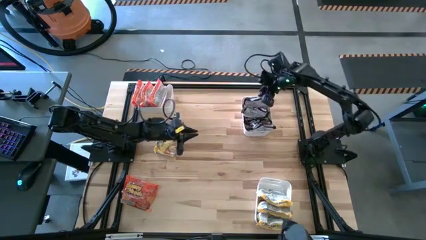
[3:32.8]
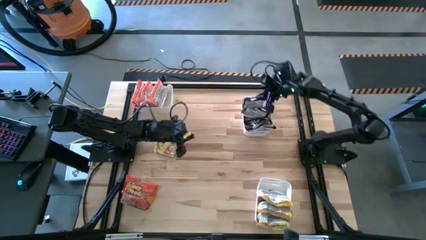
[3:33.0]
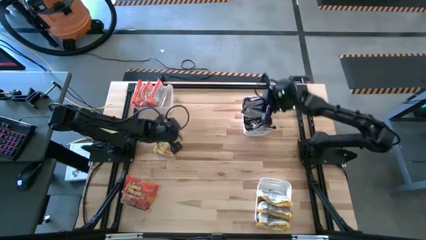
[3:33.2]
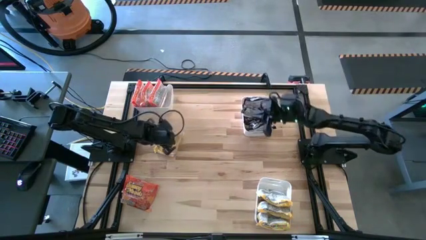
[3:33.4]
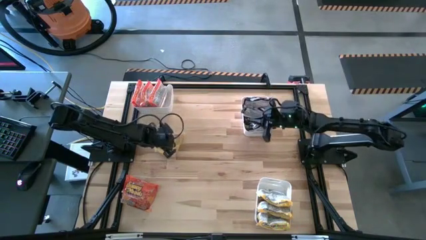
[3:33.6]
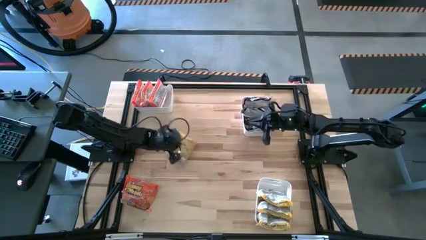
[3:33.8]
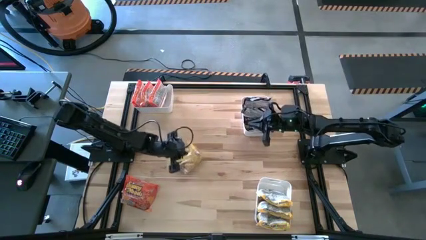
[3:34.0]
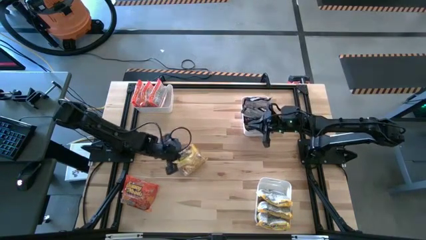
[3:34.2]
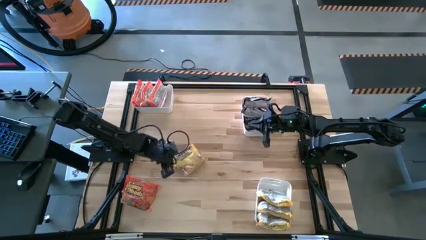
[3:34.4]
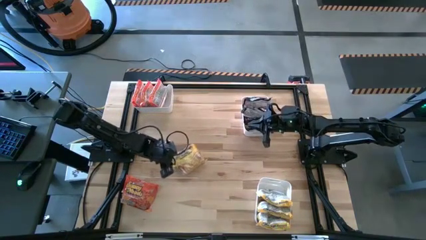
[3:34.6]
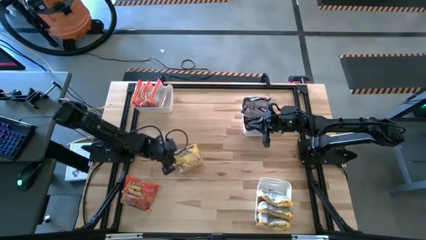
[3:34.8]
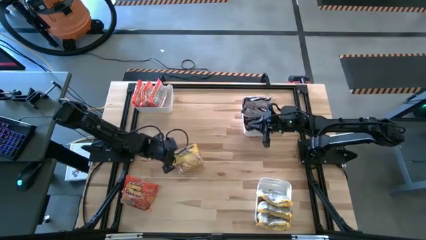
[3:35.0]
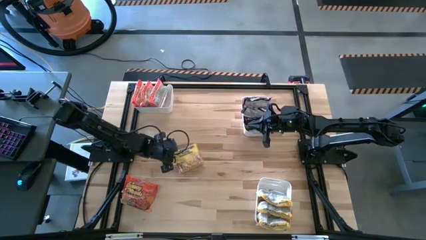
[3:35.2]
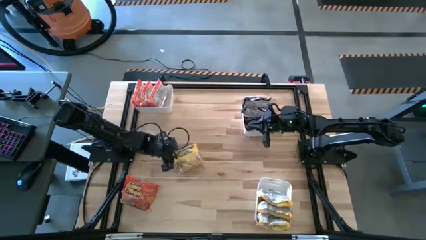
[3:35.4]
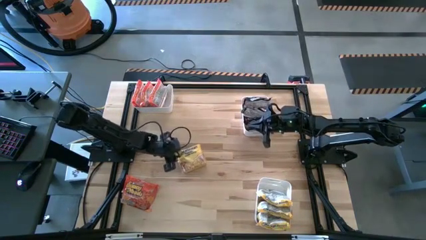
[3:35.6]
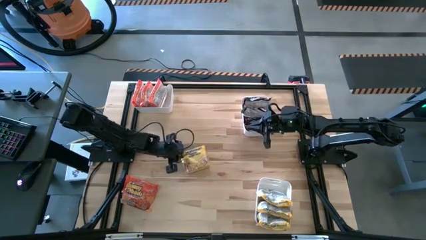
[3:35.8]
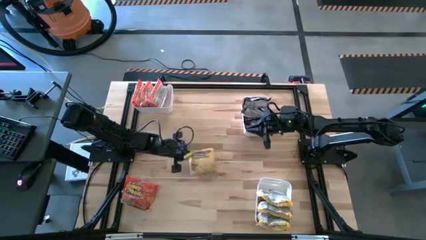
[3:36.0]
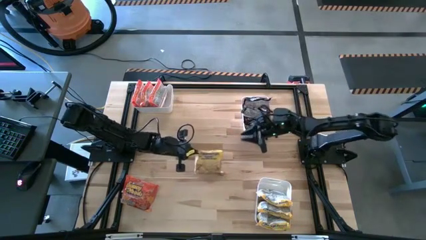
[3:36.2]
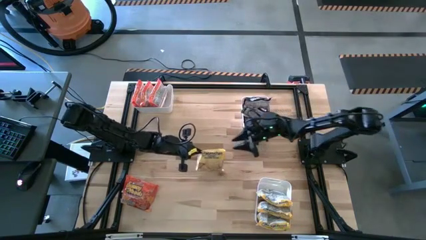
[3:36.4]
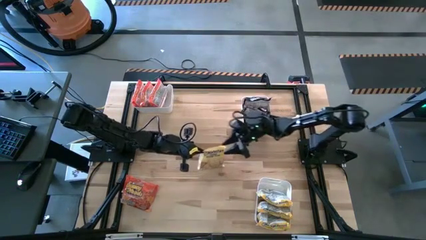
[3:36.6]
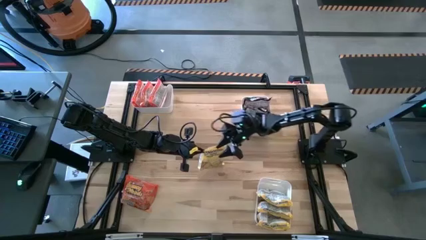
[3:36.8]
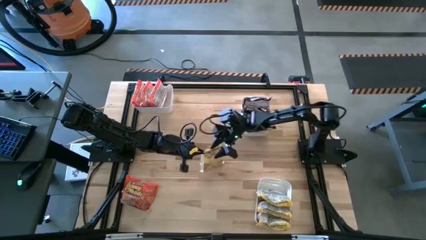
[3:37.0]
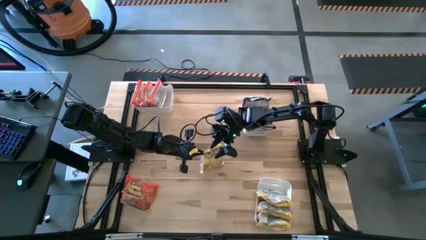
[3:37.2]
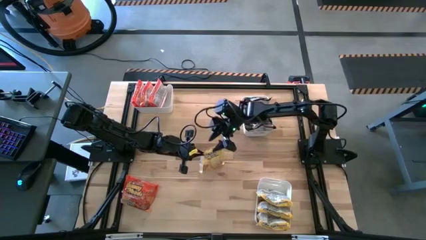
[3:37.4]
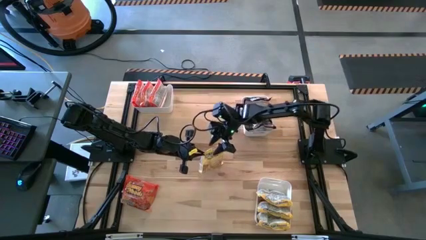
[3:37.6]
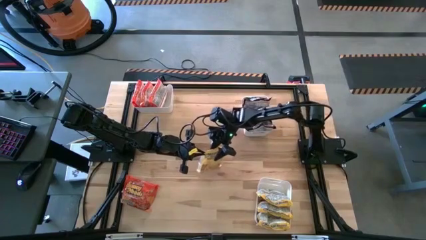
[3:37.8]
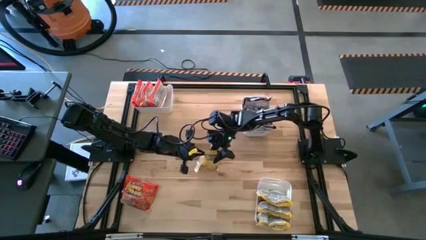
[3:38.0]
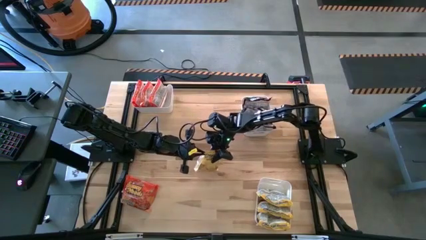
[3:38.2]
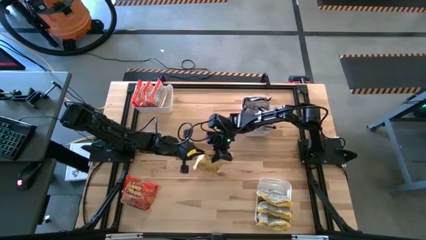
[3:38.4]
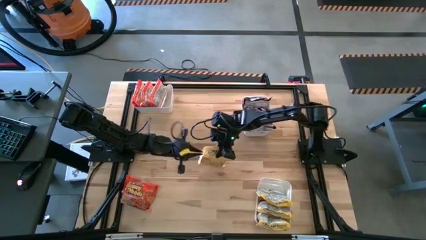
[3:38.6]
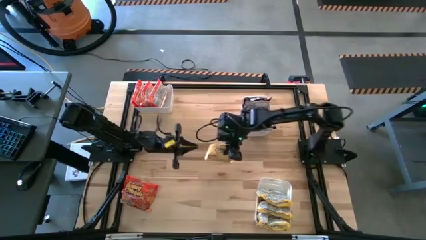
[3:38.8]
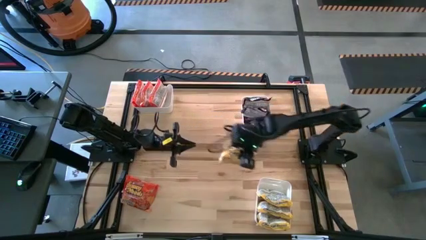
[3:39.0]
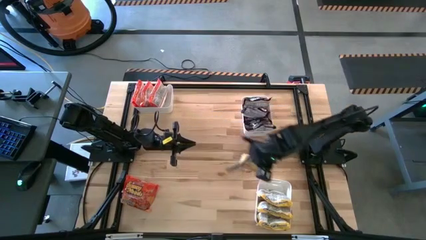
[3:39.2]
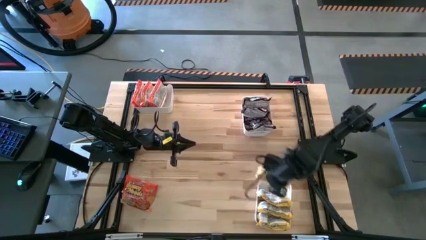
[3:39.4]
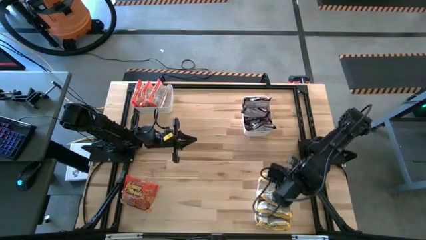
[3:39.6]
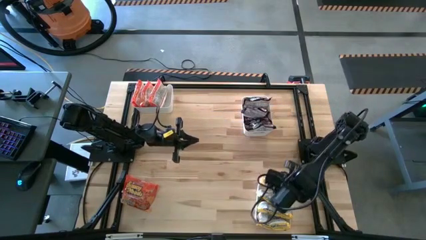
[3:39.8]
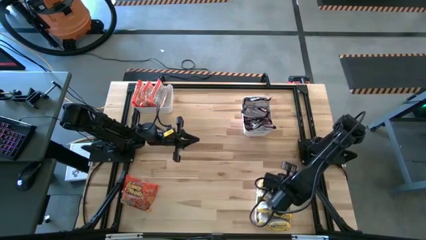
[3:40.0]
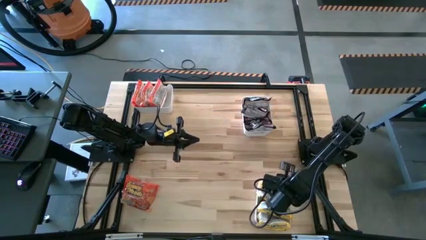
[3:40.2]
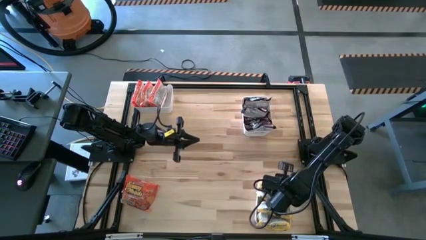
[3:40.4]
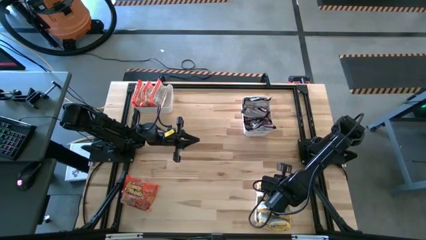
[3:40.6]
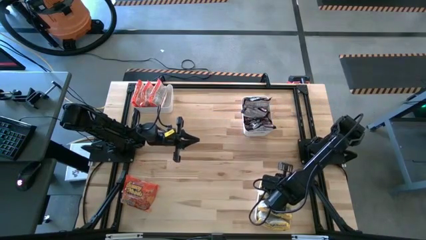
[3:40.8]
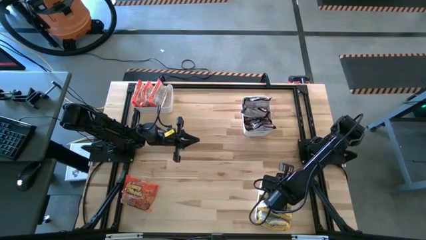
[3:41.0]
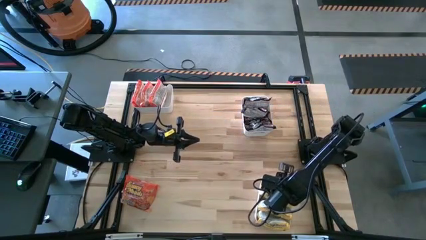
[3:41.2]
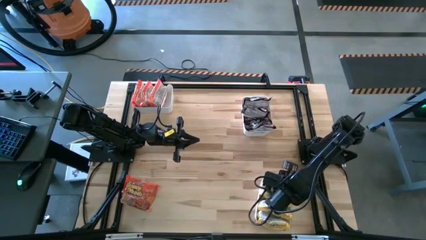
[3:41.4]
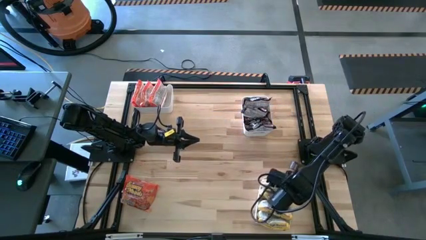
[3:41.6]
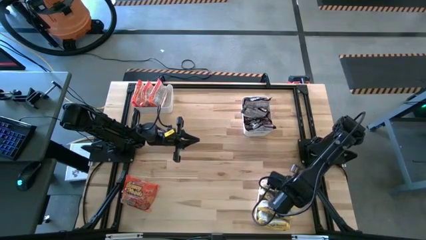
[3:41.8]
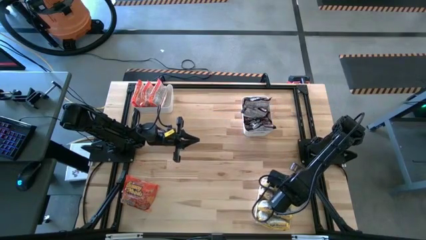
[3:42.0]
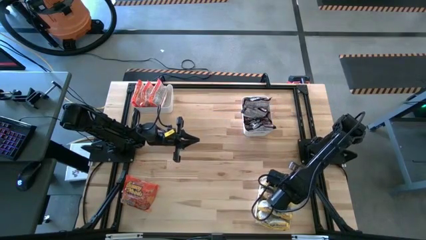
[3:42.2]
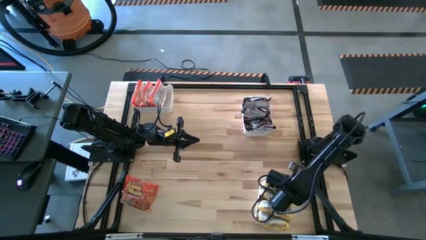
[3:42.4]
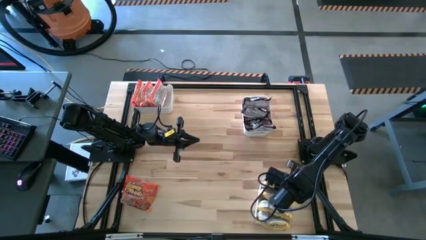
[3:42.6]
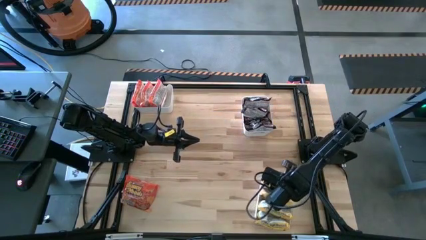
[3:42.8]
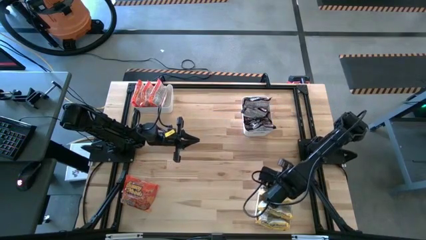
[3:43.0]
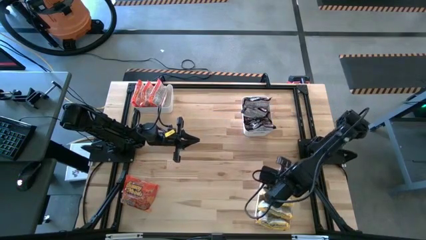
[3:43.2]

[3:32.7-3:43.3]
Task: Sort Maruchan noodles
Put the yellow noodle pack into the bottom white bin

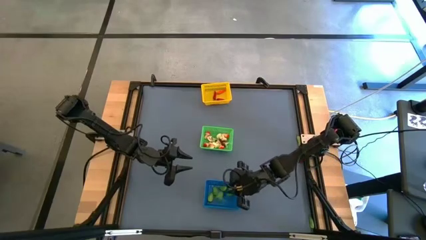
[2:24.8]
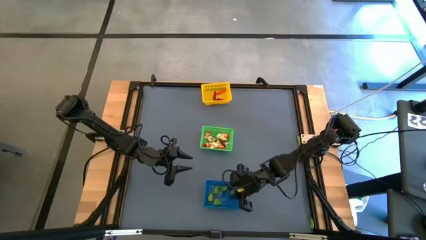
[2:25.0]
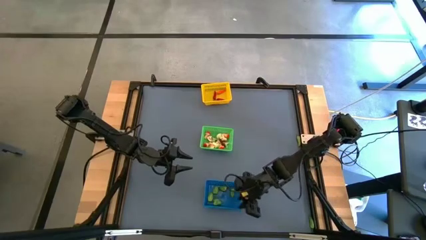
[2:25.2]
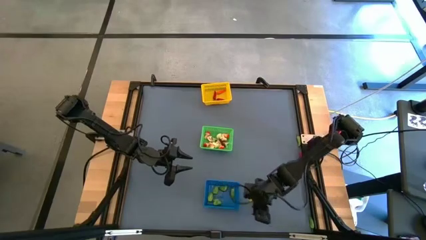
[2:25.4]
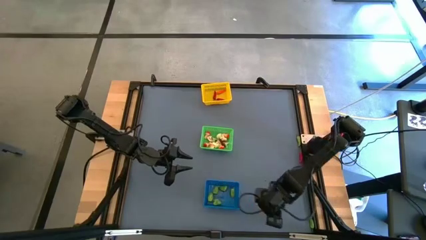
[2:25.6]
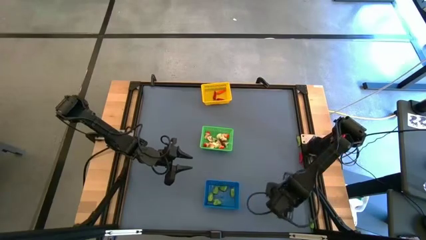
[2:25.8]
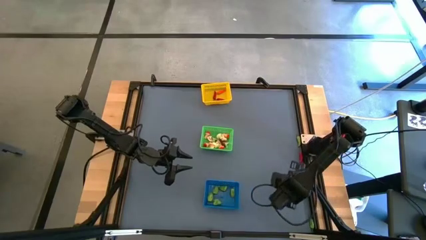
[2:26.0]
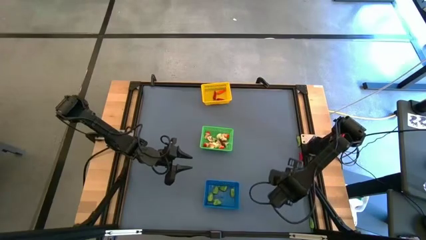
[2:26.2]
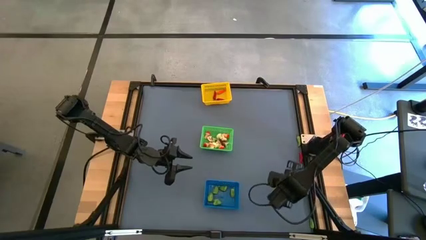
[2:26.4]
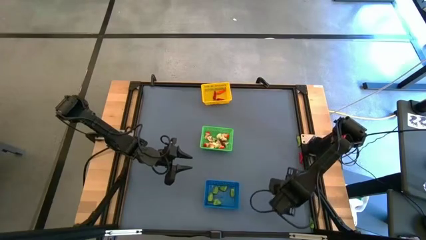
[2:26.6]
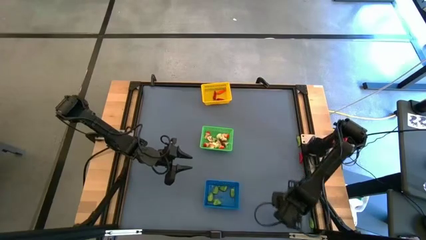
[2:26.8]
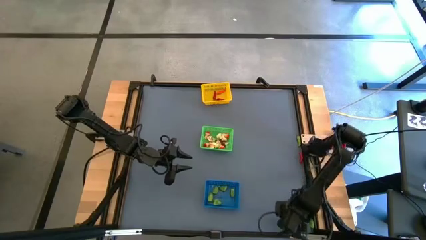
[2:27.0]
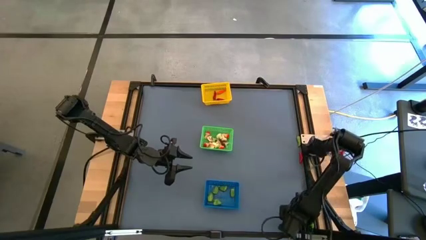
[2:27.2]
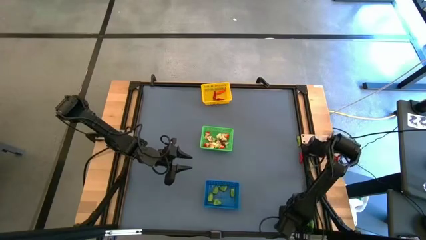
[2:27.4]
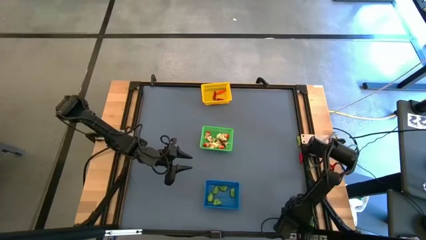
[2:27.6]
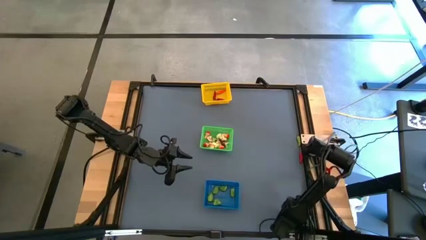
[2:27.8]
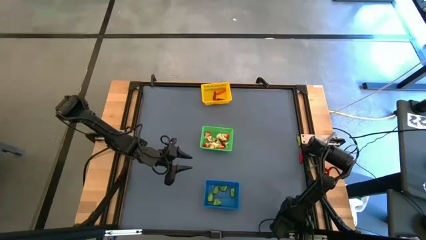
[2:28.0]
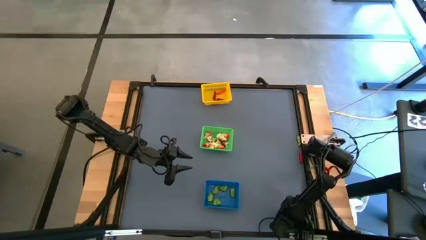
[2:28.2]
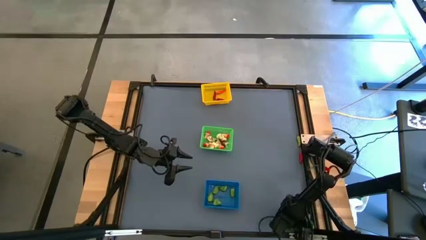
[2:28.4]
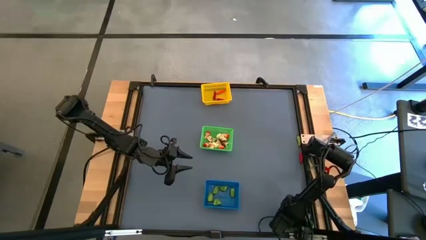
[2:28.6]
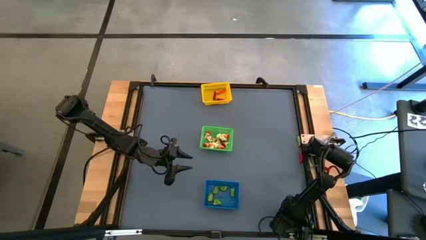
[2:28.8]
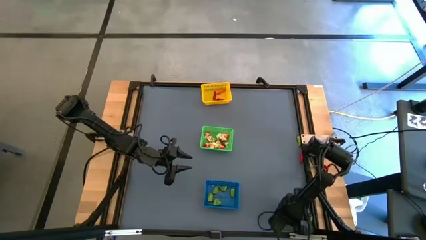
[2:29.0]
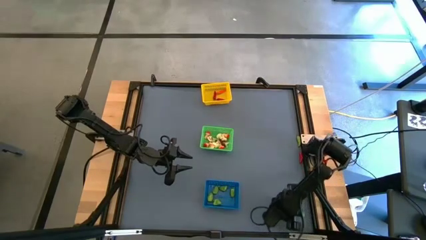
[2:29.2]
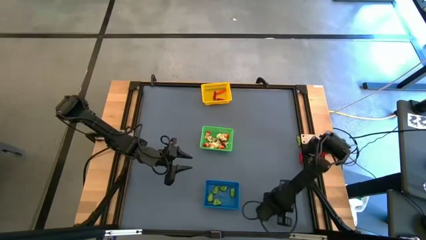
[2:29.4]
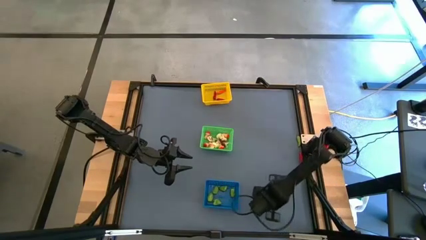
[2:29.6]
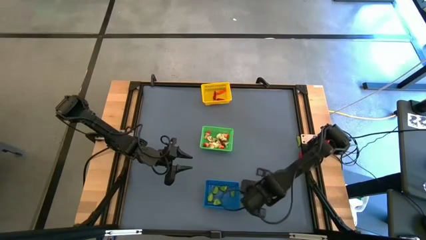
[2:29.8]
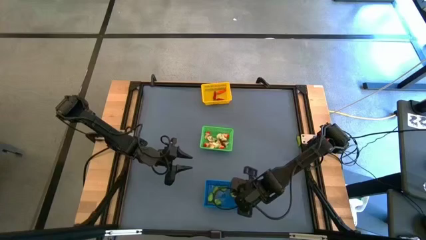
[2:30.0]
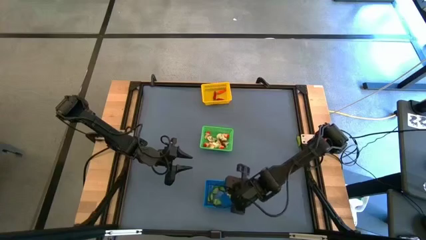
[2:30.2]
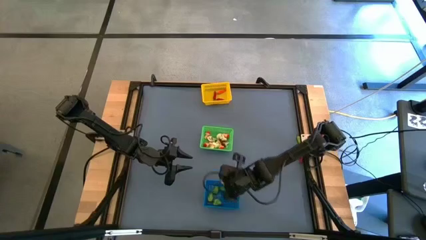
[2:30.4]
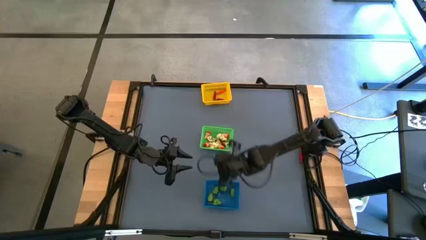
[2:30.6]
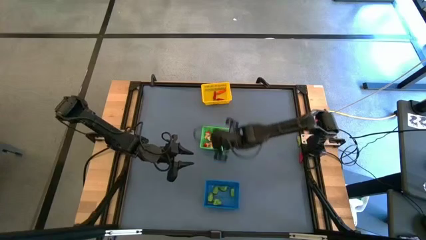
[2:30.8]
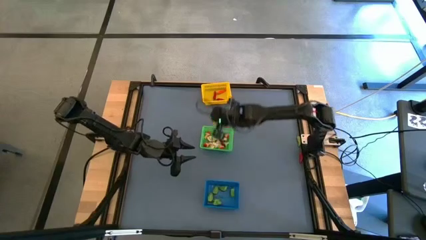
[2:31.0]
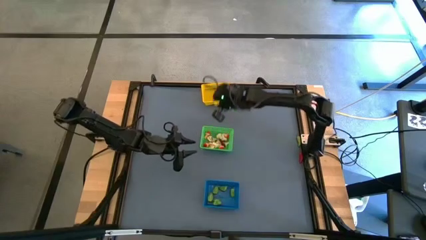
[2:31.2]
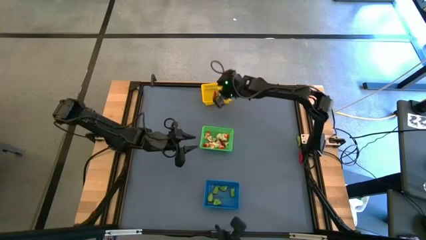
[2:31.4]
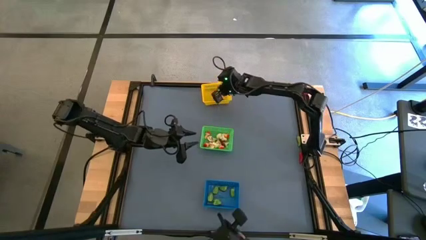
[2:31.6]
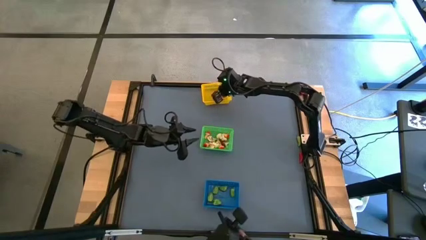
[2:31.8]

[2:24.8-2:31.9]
Task: Sort produce into baskets
Put the green chili pepper into the yellow bin
